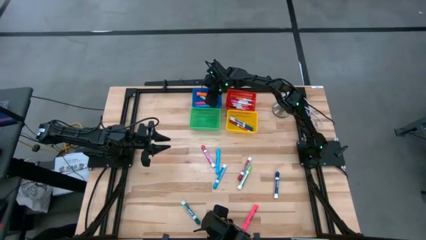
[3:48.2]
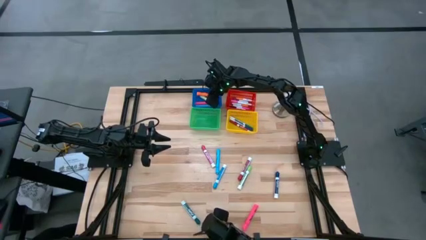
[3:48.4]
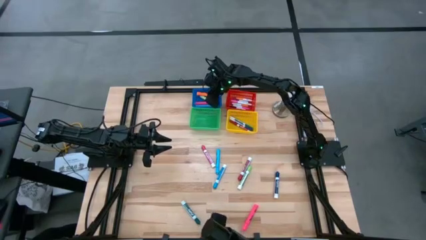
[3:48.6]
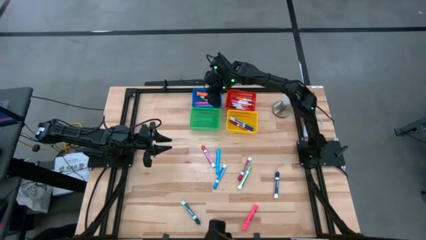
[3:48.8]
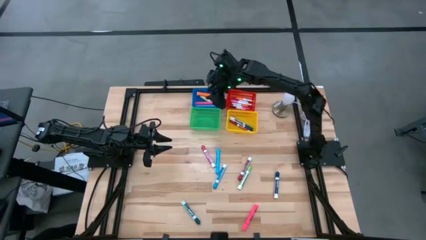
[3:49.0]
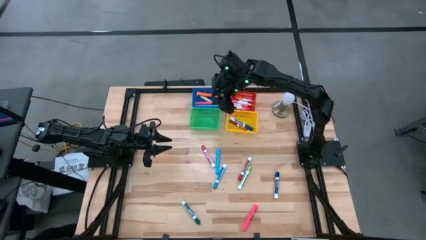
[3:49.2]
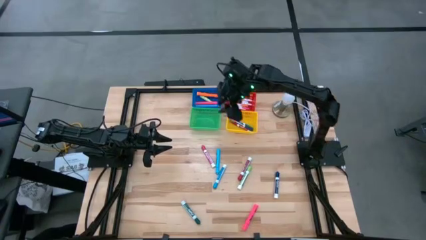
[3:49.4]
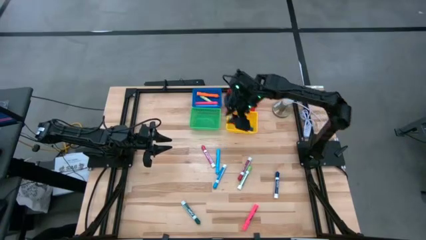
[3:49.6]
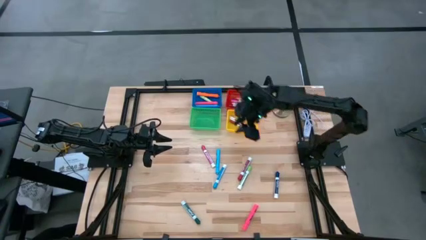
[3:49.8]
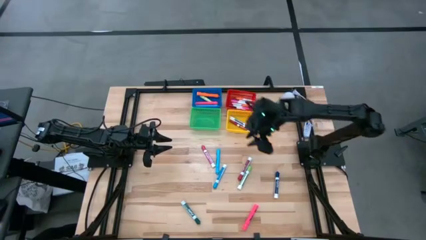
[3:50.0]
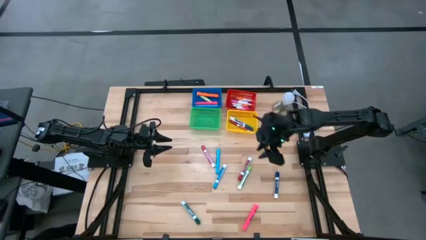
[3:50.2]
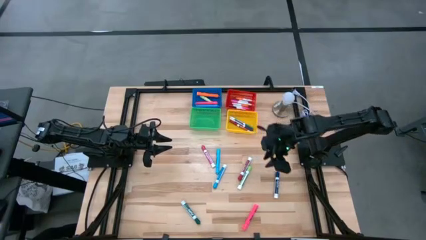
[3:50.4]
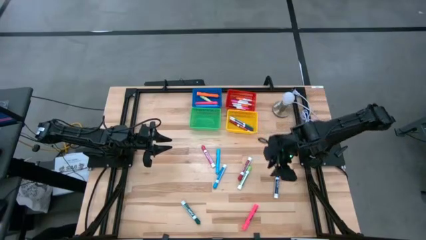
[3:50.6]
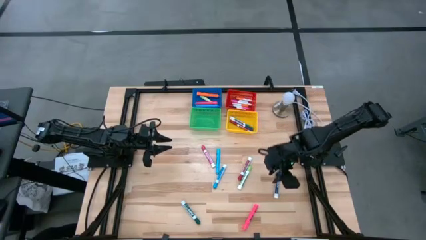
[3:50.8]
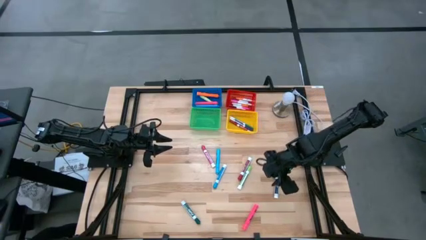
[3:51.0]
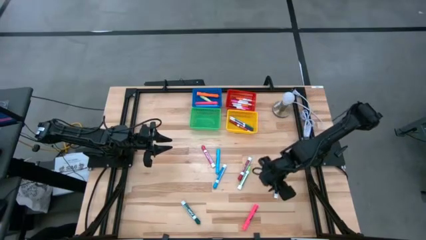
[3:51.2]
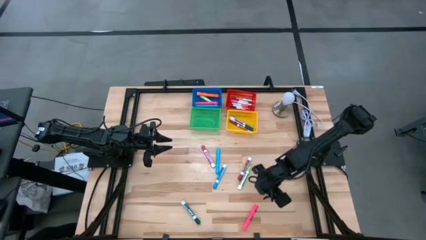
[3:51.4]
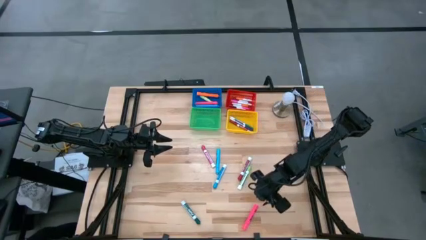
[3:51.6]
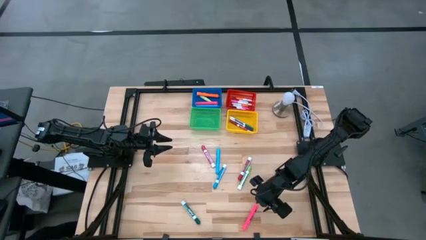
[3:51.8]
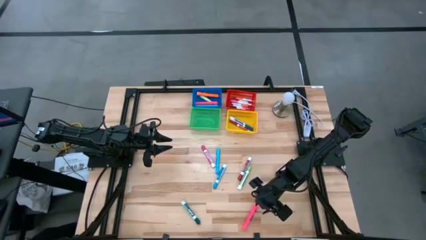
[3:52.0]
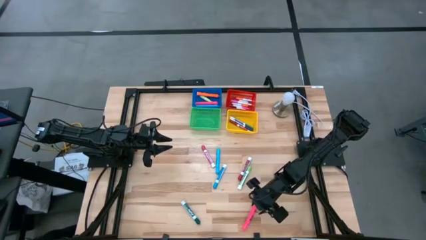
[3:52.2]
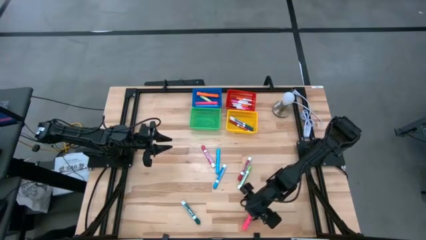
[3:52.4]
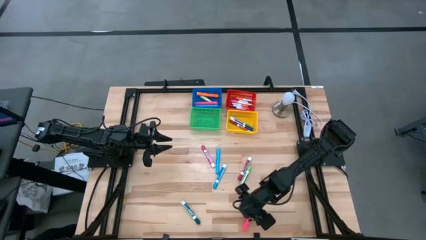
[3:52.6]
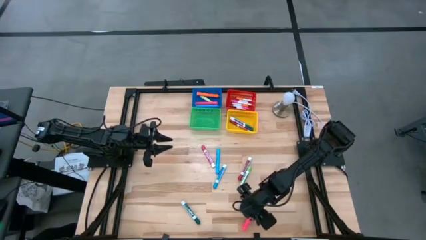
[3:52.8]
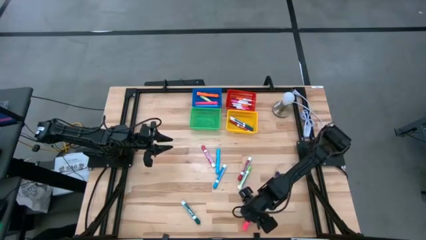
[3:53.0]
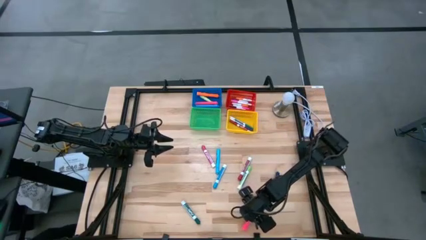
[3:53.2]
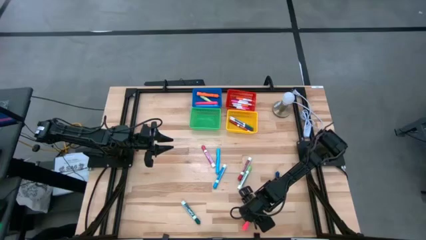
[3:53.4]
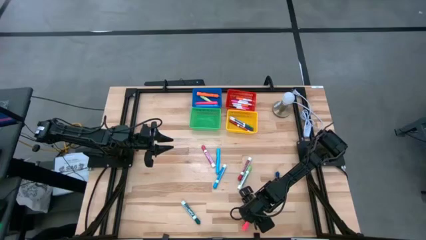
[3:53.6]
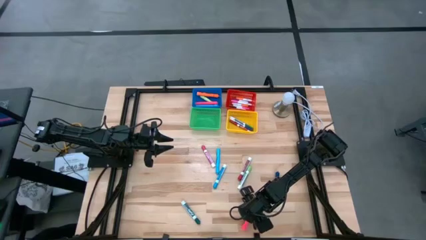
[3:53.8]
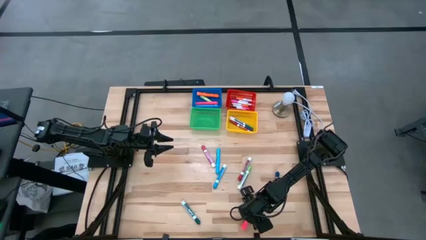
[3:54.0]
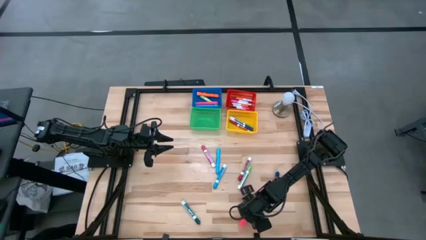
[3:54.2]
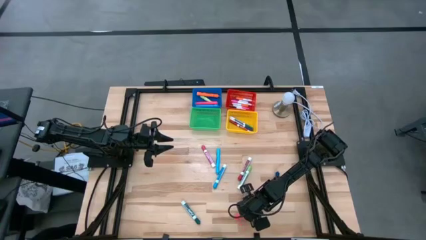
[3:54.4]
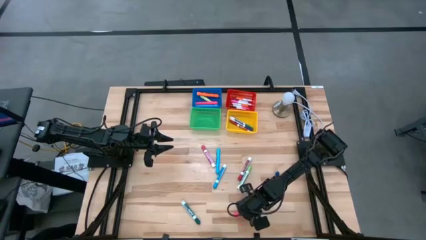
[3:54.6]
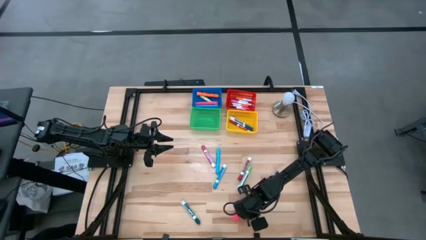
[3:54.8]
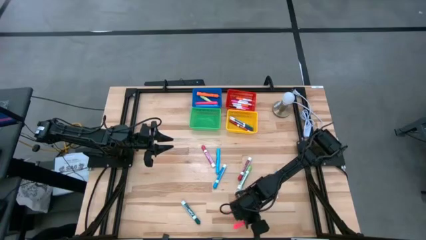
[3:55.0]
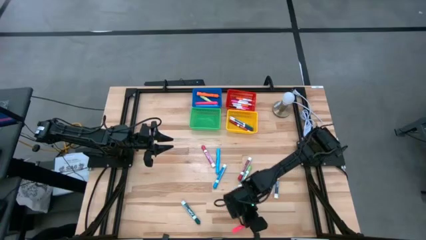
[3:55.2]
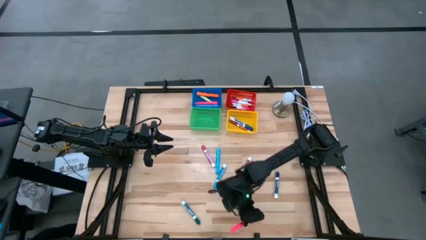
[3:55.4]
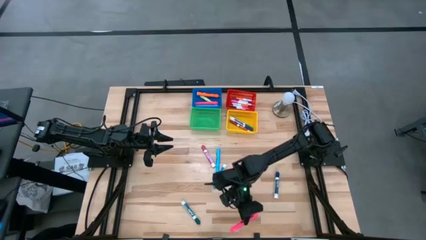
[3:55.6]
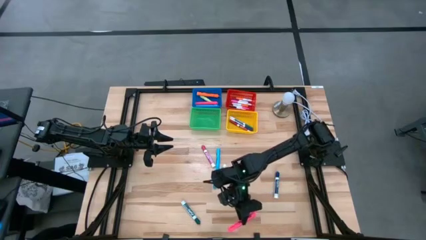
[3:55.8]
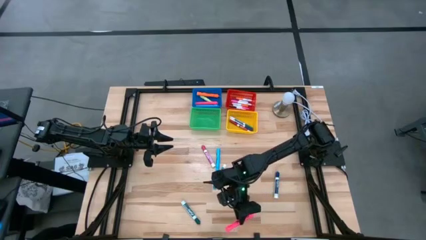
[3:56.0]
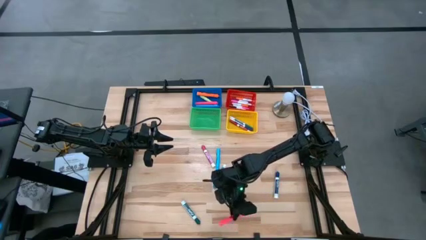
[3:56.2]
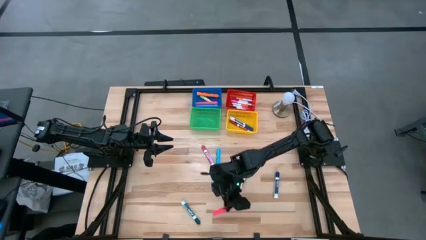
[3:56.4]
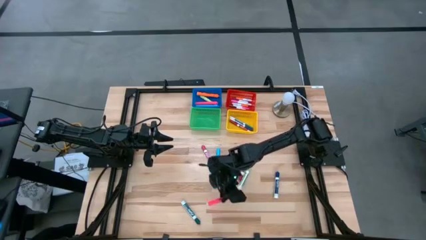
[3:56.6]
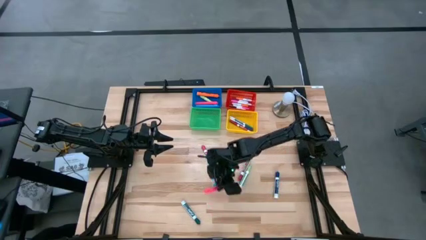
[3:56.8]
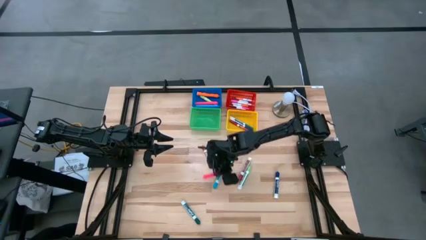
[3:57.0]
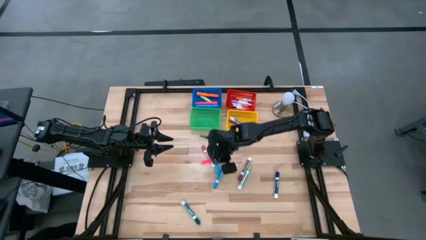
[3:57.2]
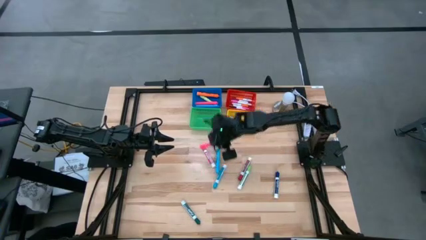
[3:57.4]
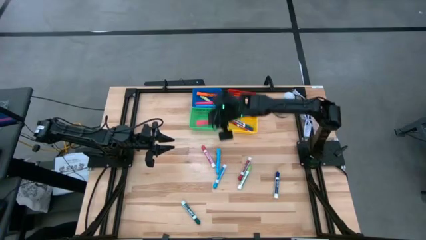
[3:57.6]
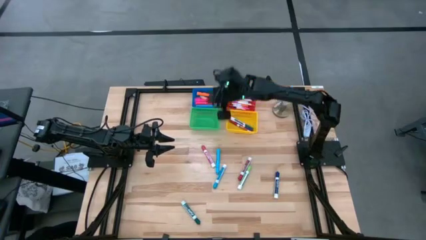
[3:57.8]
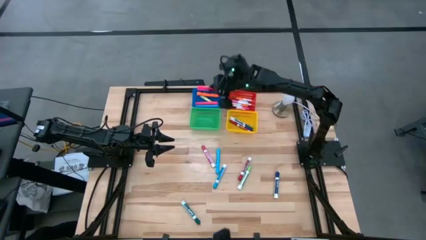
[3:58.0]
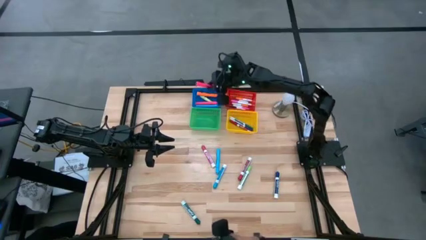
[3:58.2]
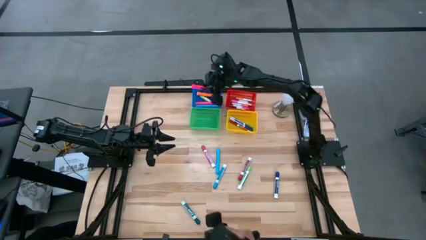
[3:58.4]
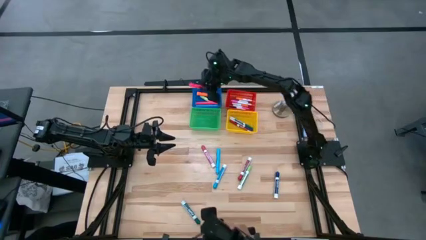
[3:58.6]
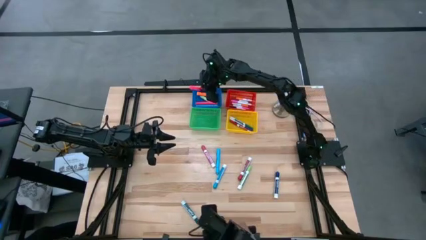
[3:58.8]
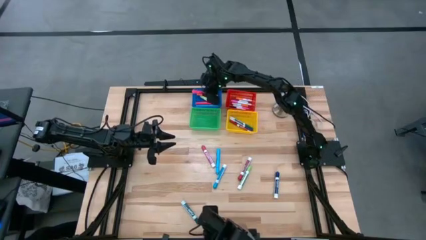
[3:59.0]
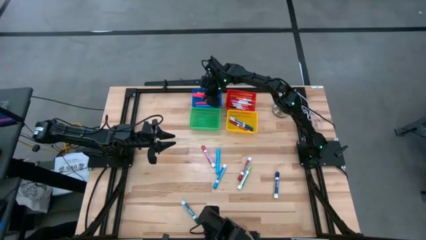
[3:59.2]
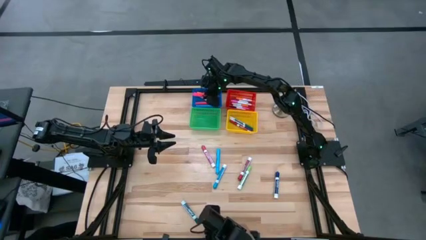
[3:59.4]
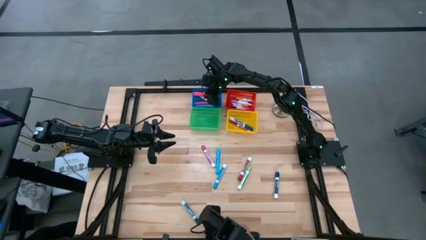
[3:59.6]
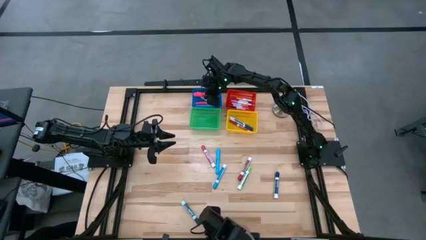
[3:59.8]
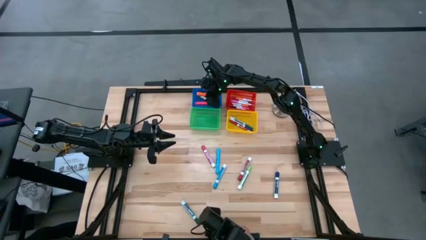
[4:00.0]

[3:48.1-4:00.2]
Task: Pick & Place Markers
Put the pink highlighter into the blue basket
